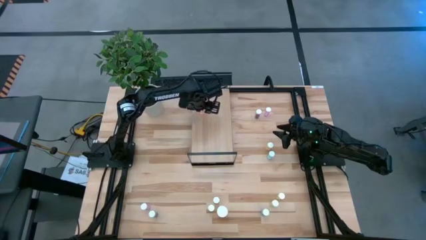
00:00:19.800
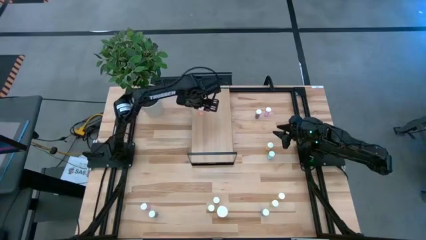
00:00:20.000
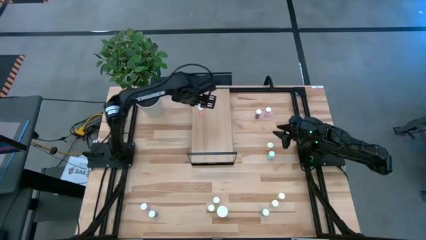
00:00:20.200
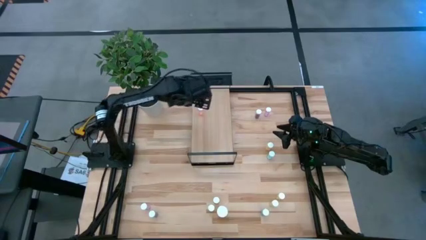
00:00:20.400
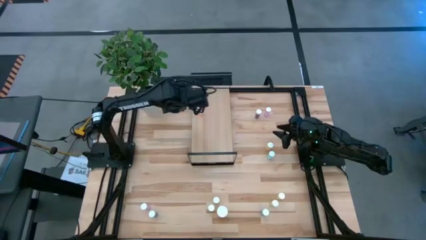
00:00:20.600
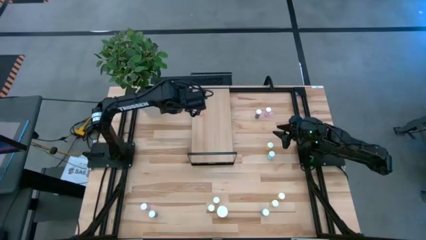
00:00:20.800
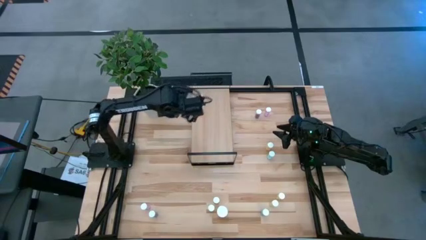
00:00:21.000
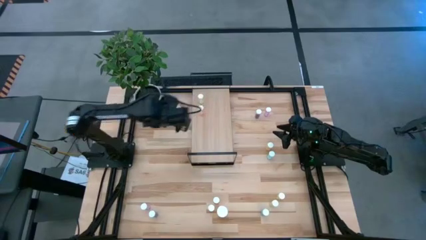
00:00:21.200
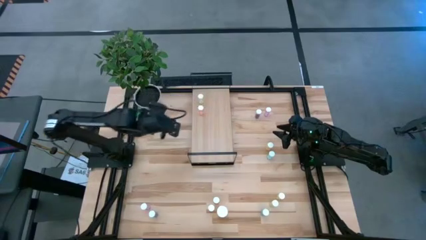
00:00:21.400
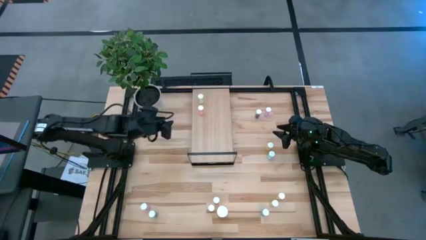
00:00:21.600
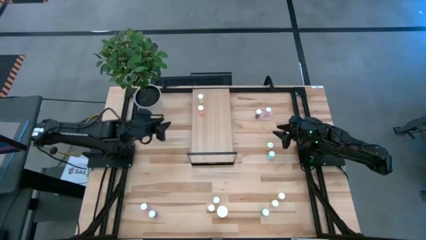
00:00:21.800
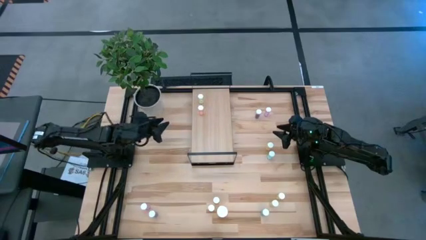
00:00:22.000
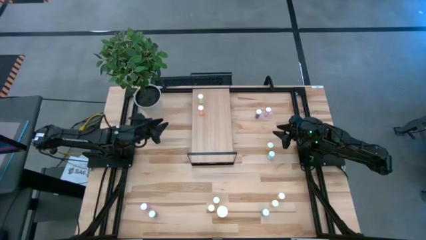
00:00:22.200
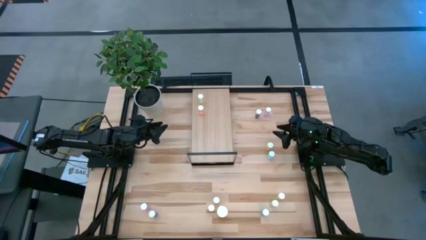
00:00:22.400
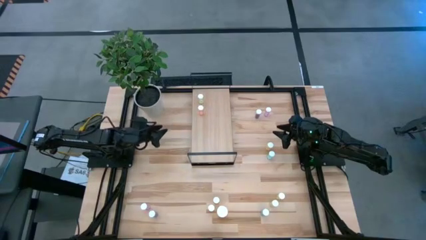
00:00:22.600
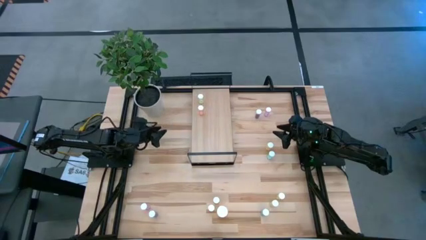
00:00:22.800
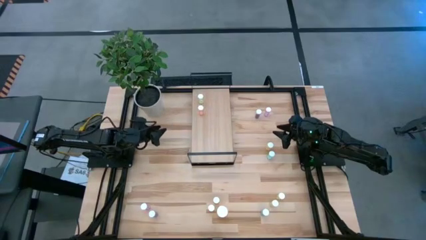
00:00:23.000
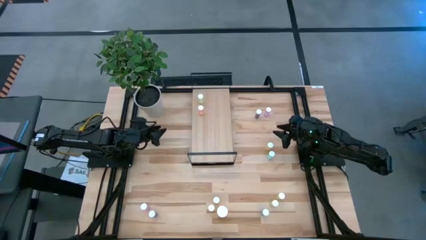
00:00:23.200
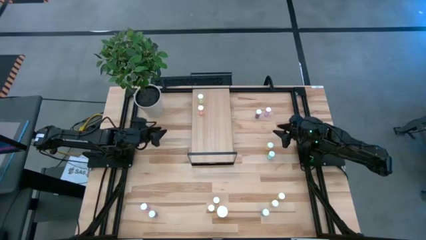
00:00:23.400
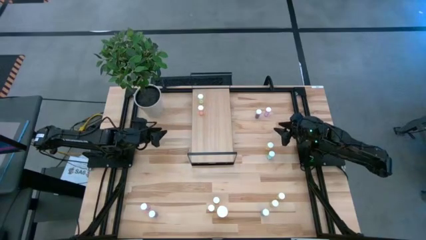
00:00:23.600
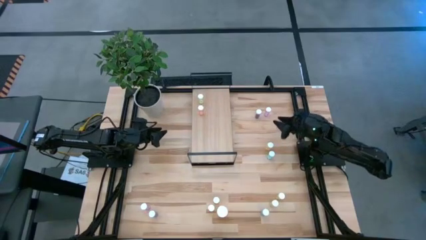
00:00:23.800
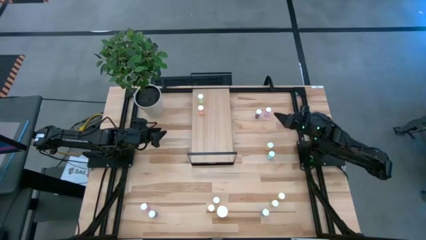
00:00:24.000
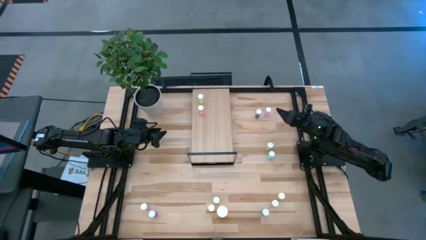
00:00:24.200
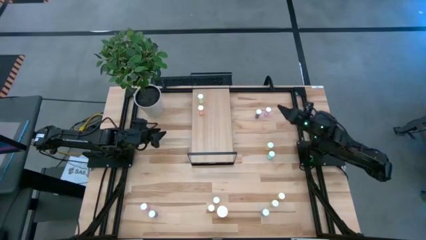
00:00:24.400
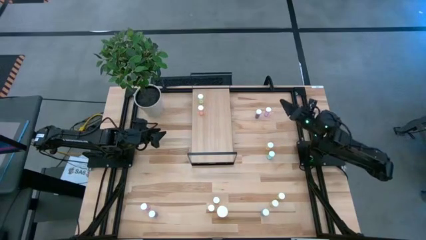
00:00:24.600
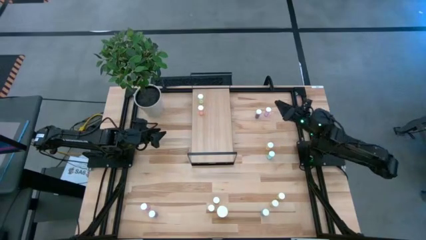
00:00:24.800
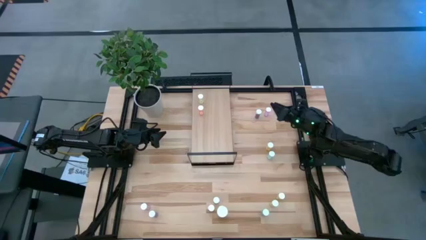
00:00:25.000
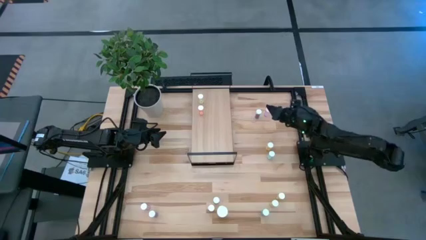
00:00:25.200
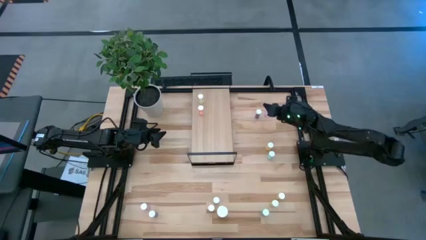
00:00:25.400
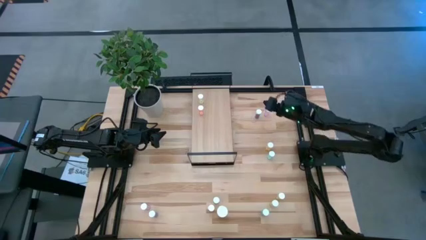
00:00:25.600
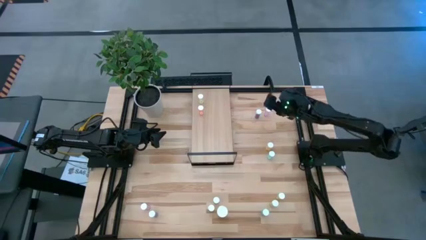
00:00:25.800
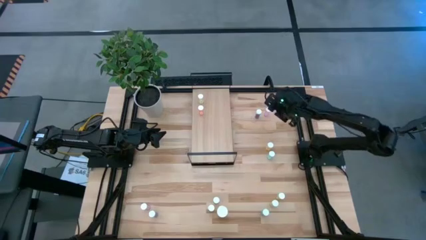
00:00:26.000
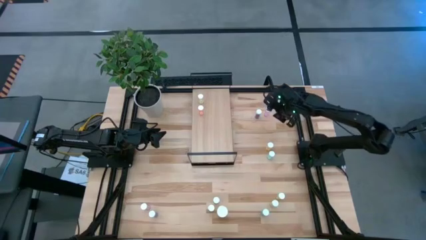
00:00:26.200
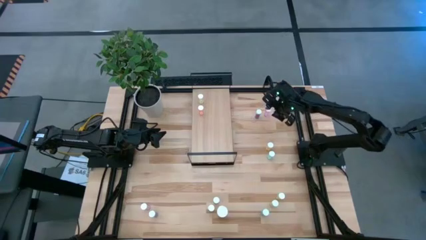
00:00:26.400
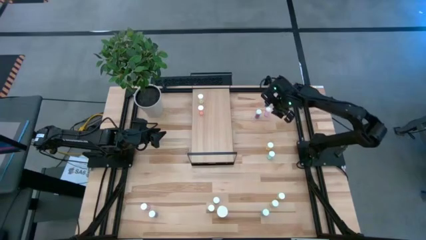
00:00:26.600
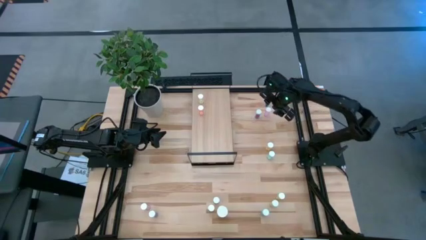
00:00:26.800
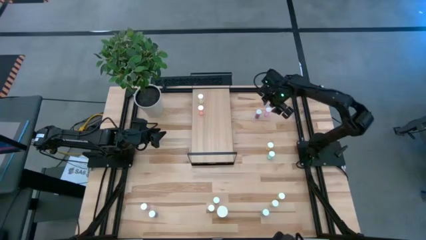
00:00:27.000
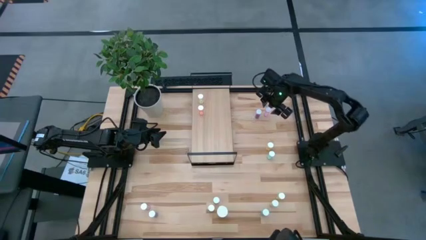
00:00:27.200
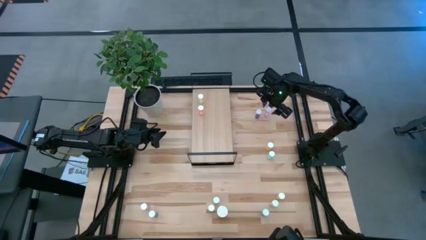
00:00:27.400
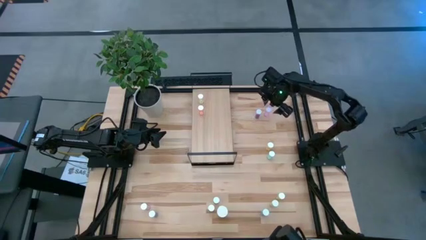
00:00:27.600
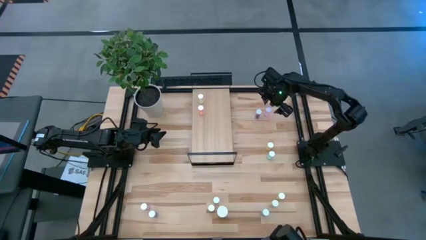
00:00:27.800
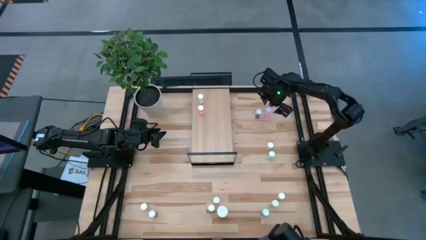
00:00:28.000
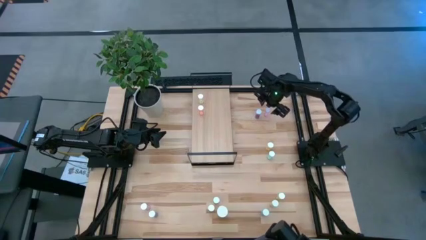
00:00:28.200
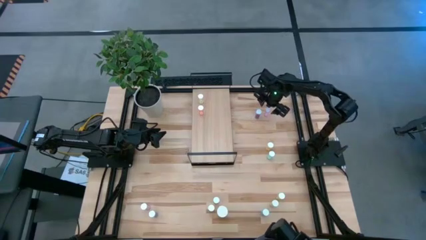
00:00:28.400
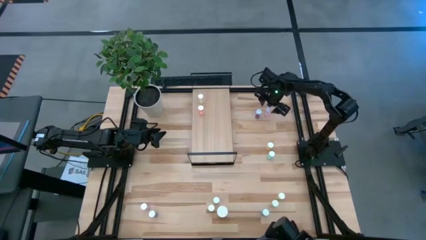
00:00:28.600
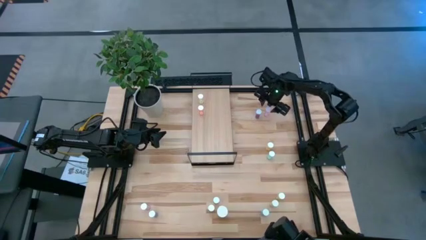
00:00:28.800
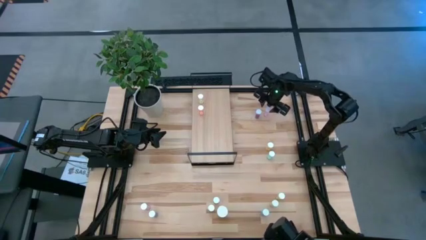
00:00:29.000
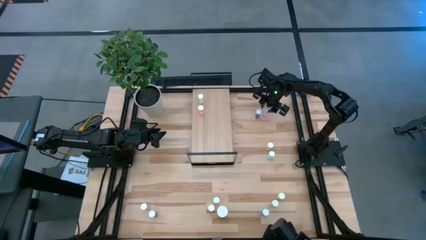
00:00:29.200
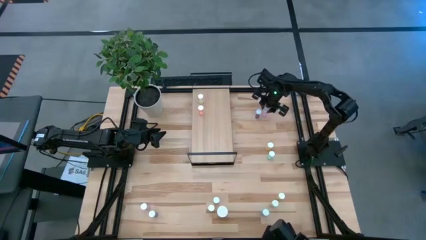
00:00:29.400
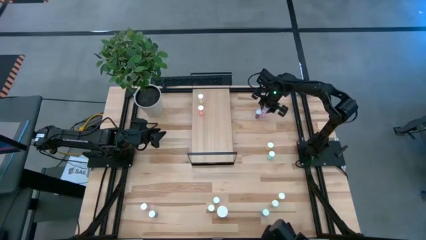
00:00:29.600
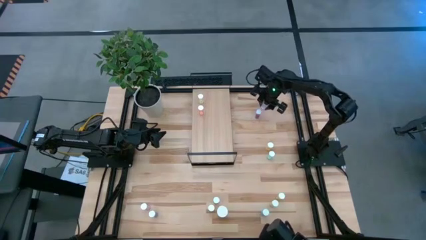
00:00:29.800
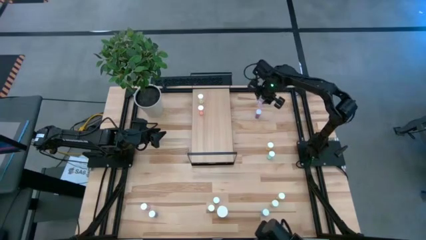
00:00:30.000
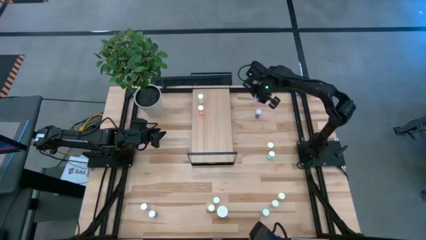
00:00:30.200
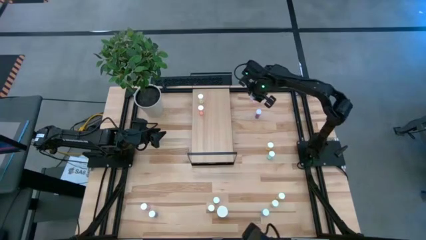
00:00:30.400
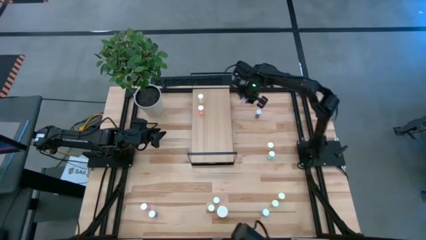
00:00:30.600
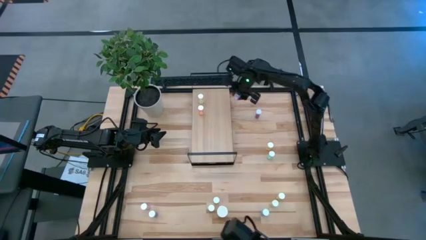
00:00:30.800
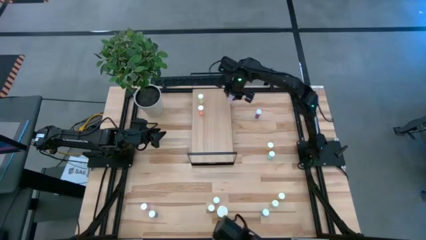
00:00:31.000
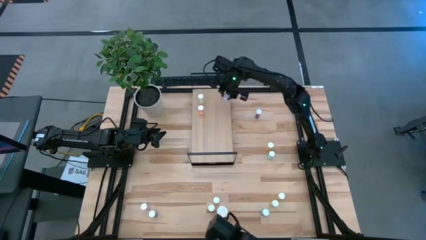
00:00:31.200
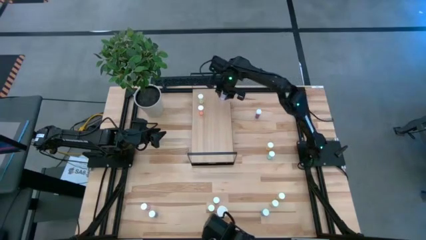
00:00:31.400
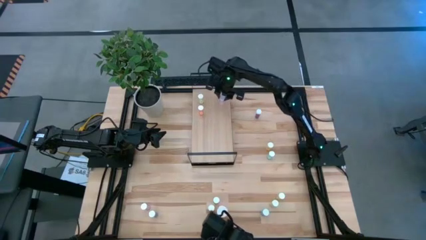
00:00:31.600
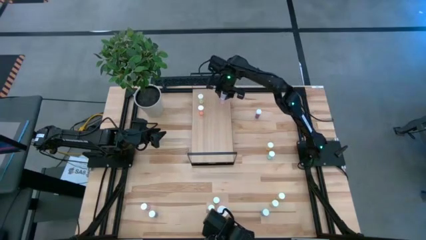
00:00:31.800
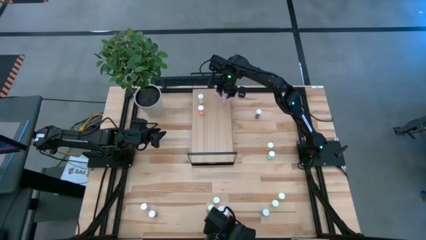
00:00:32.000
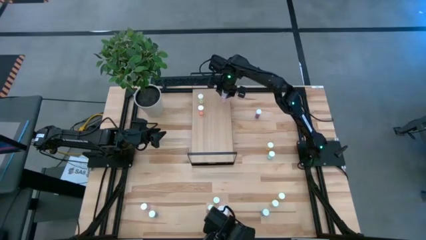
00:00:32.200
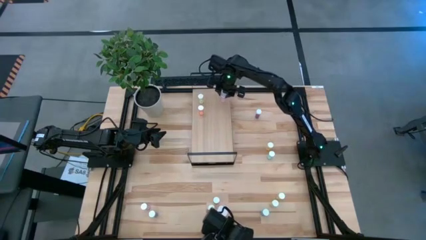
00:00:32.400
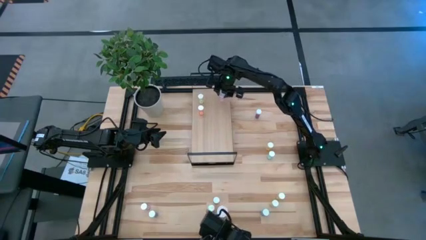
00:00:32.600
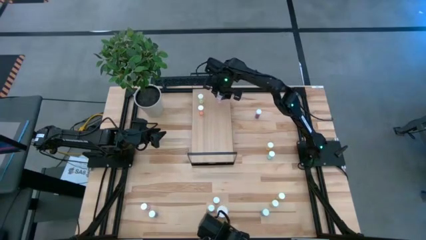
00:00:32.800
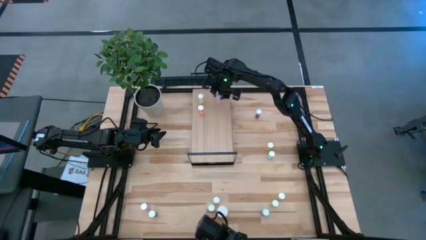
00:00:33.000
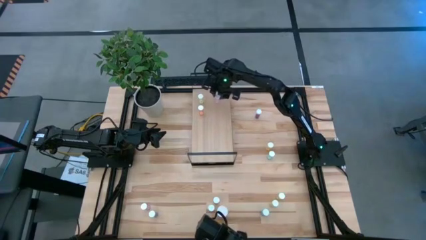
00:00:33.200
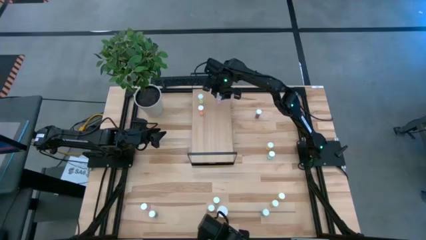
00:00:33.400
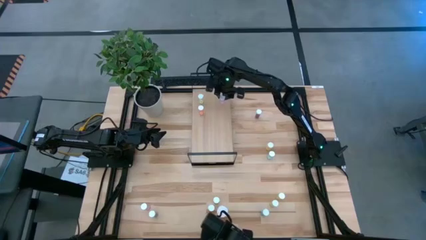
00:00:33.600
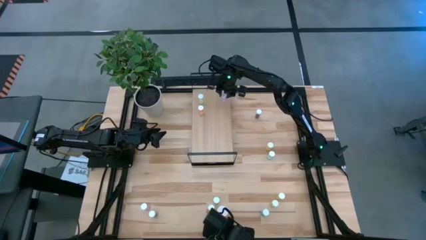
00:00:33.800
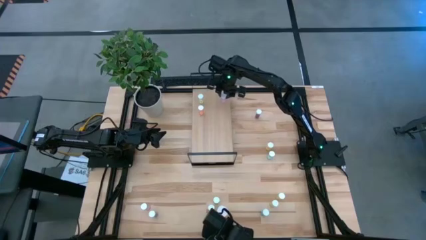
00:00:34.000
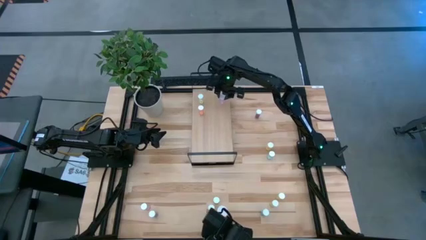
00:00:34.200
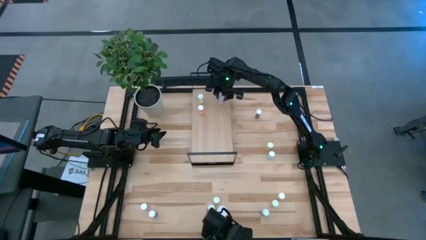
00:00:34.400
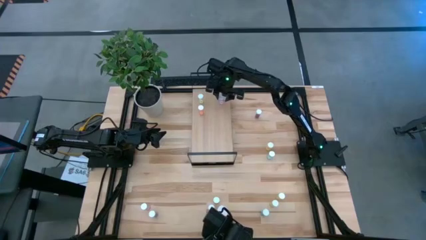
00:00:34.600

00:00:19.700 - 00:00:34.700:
Task: Pick and place medicine bottles onto shelf by color
Put the top pink pill bottle on the shelf
